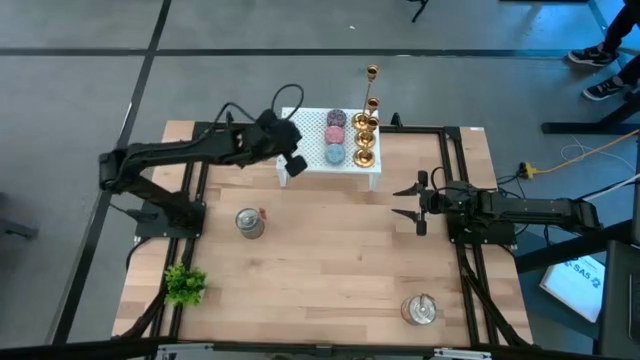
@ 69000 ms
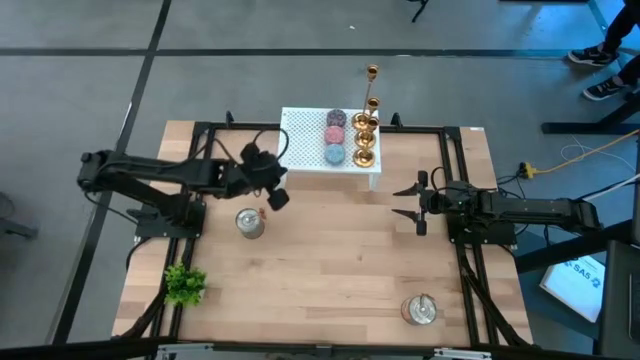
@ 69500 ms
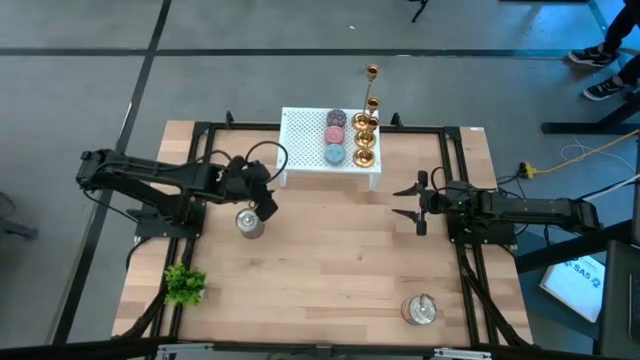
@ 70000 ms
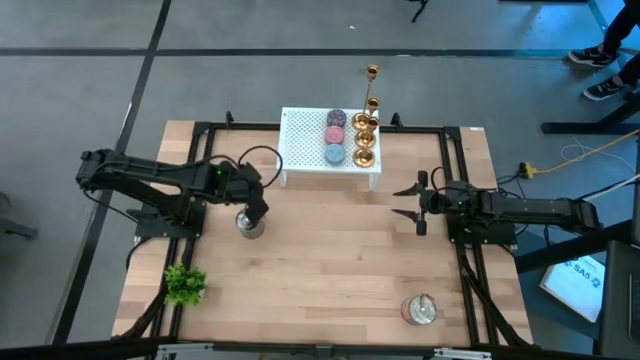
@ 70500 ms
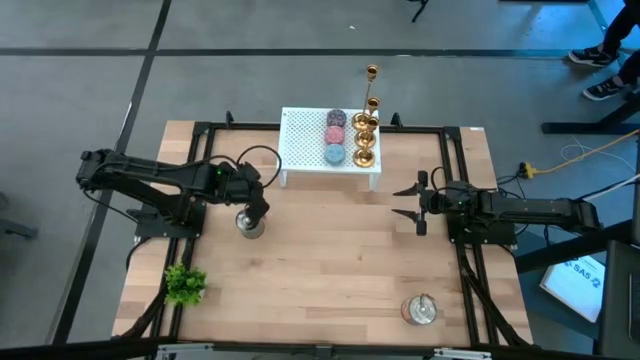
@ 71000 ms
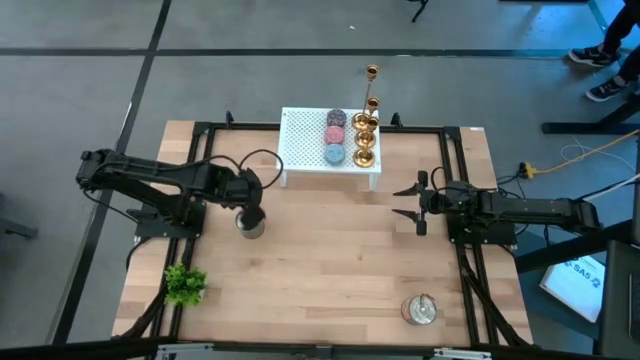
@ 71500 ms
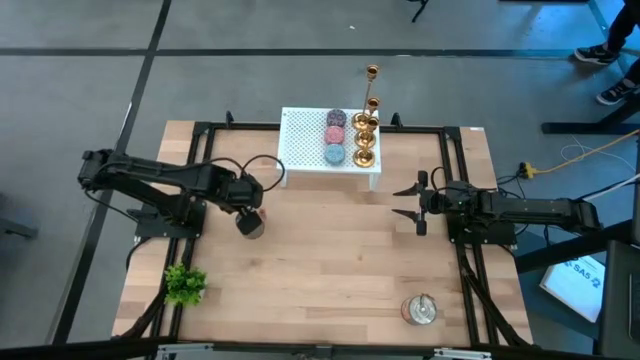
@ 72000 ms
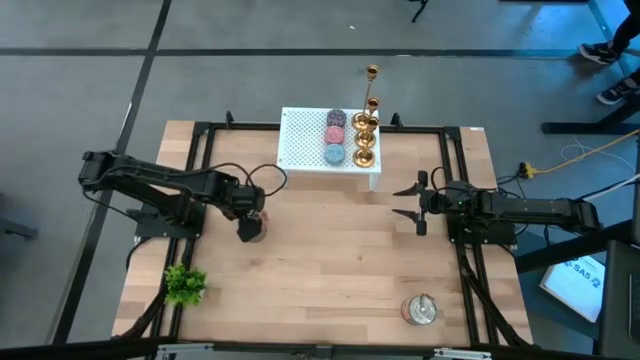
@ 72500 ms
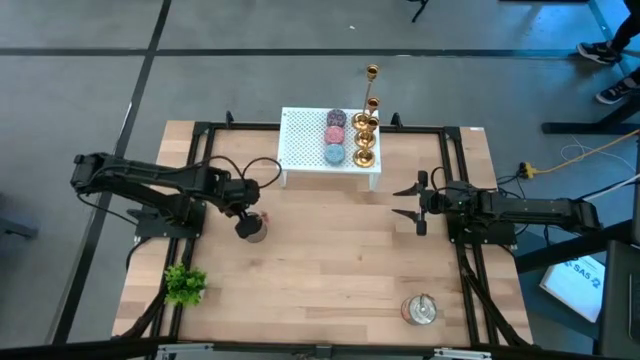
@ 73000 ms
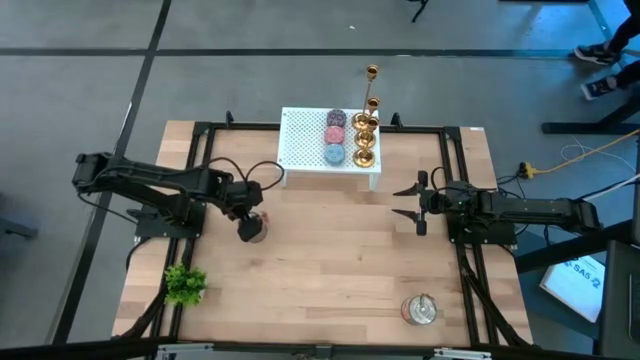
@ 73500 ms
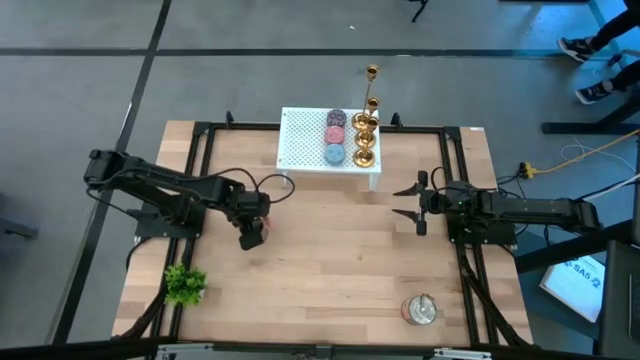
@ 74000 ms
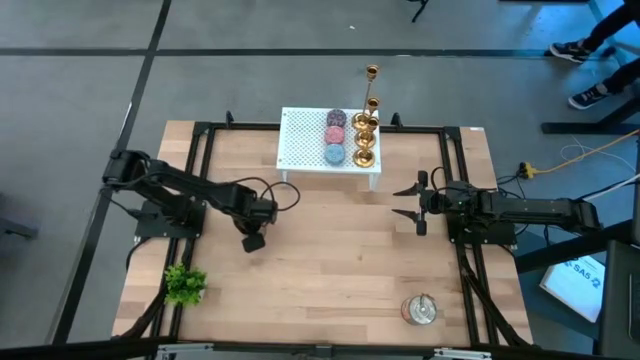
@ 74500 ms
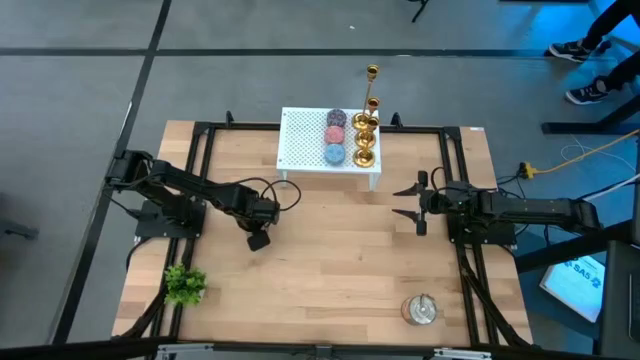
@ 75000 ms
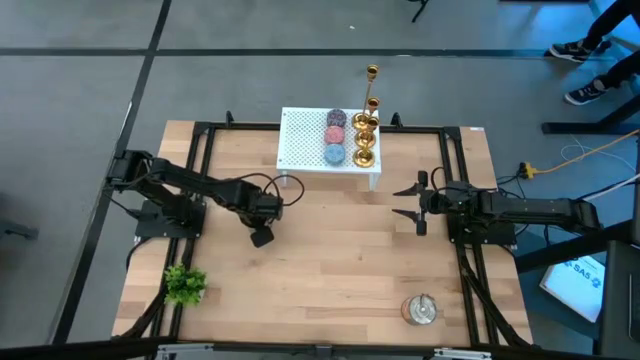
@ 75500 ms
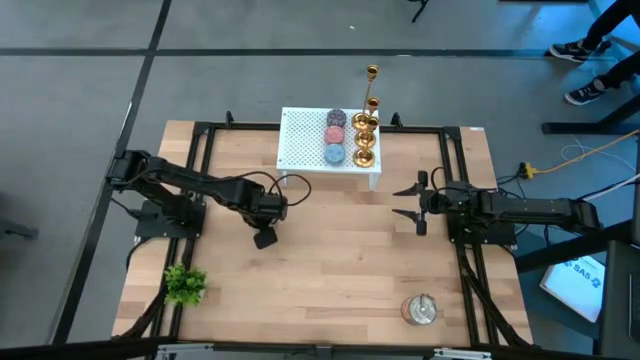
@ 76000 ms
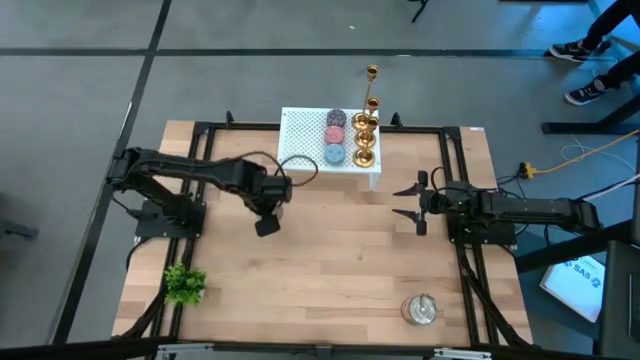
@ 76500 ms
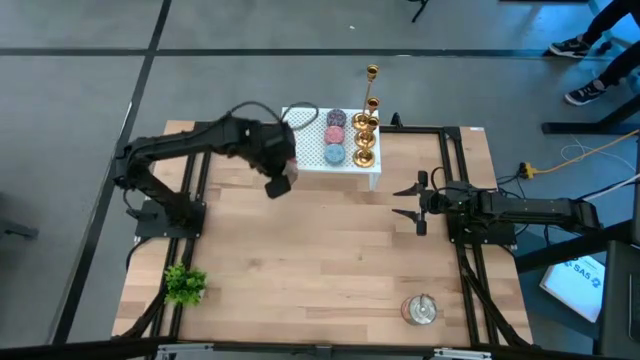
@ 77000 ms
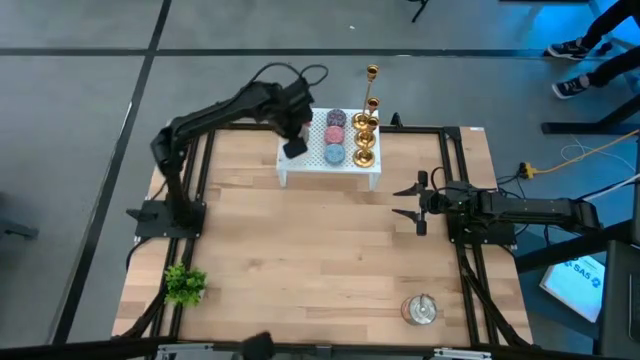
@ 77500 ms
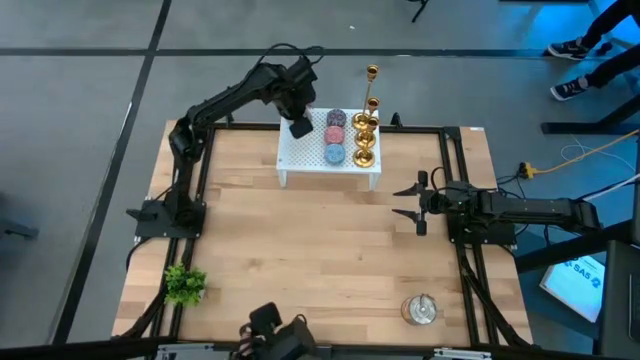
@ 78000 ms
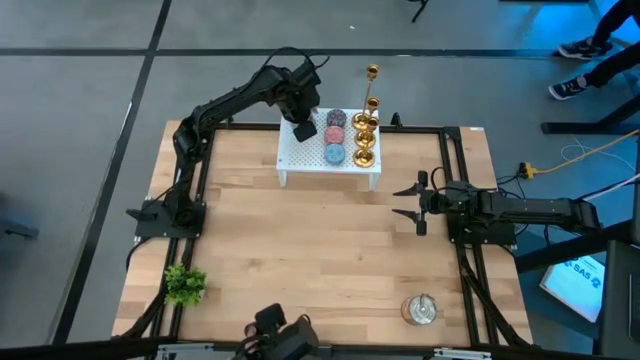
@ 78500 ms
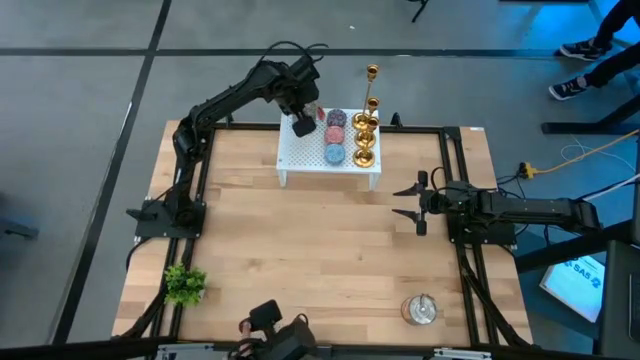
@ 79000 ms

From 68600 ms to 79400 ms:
Task: Pick & Place candle stick holders
Put the large brown scented candle can on the shelf

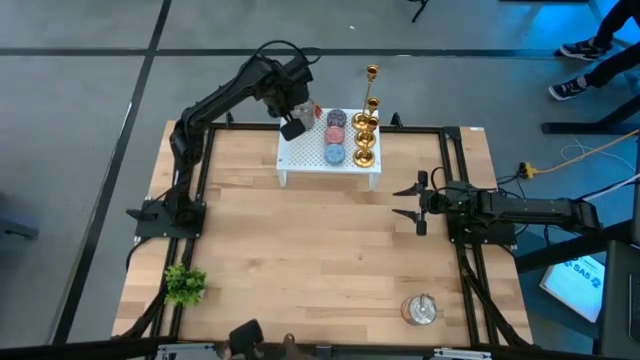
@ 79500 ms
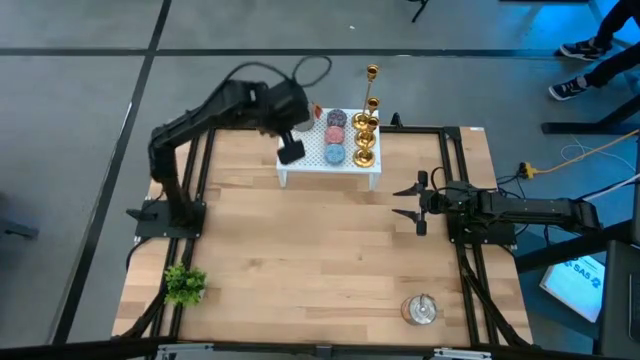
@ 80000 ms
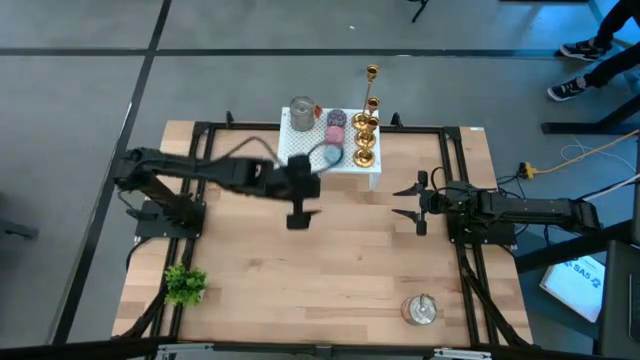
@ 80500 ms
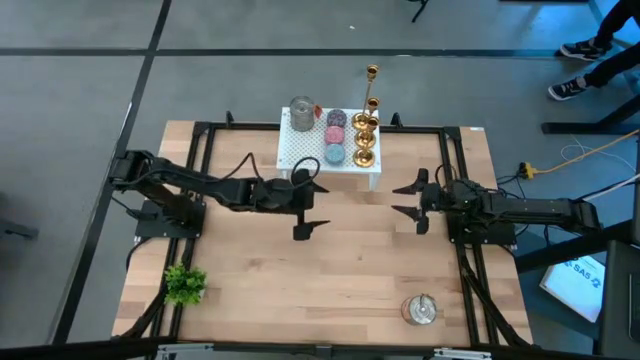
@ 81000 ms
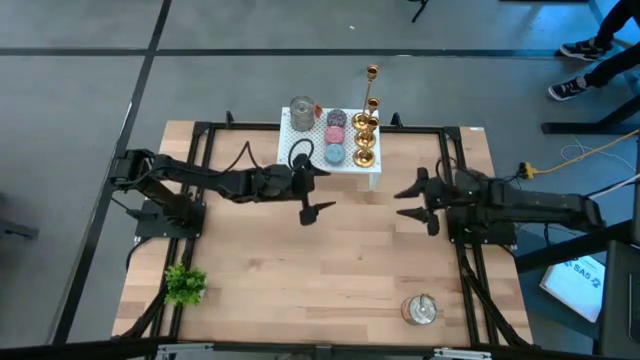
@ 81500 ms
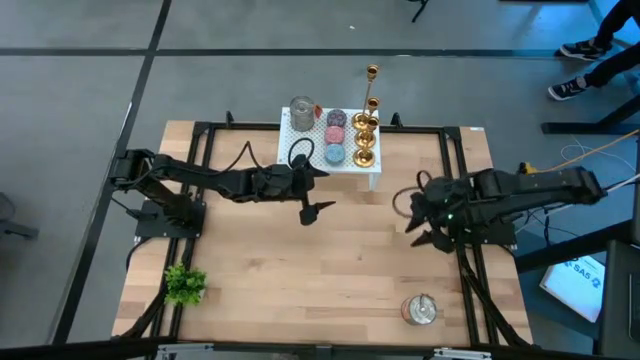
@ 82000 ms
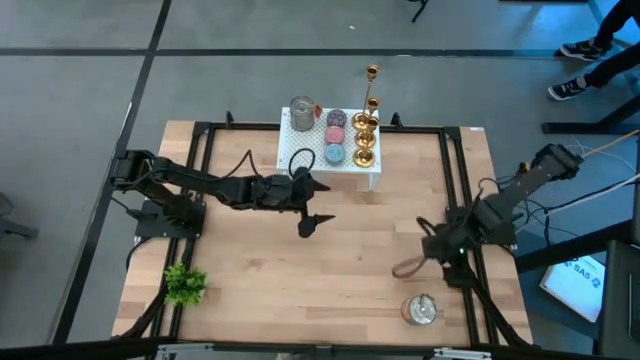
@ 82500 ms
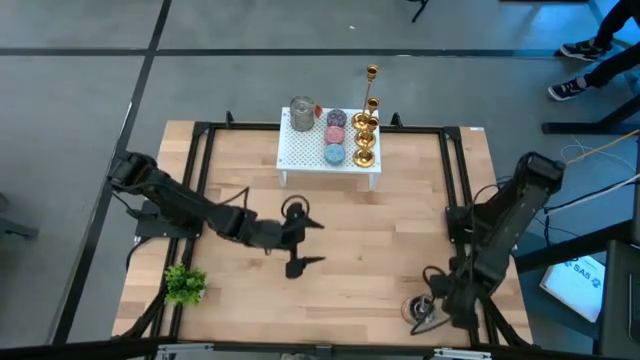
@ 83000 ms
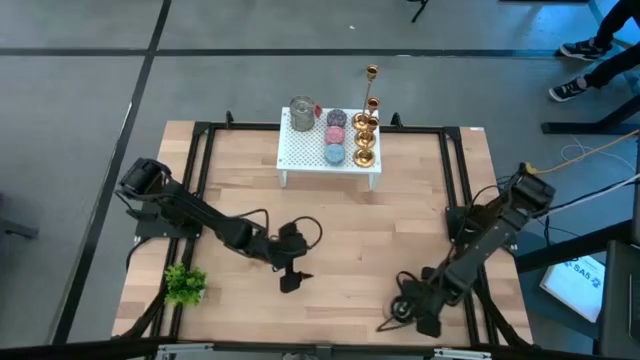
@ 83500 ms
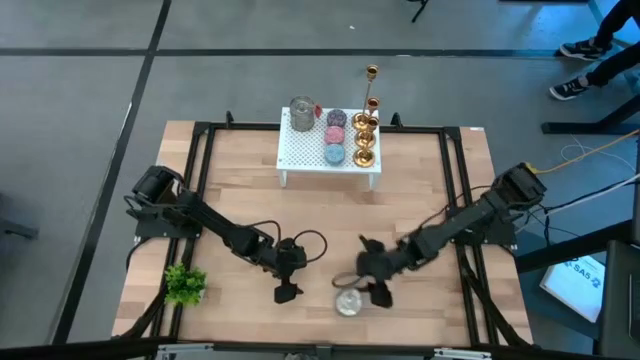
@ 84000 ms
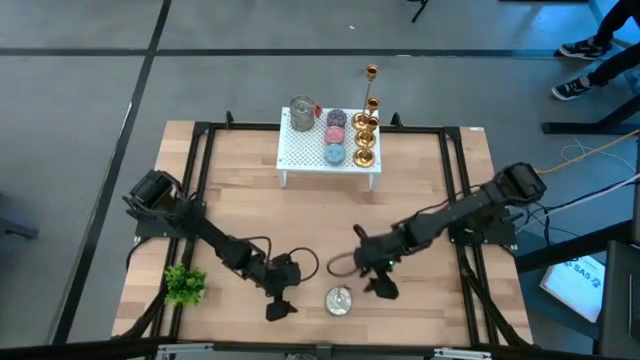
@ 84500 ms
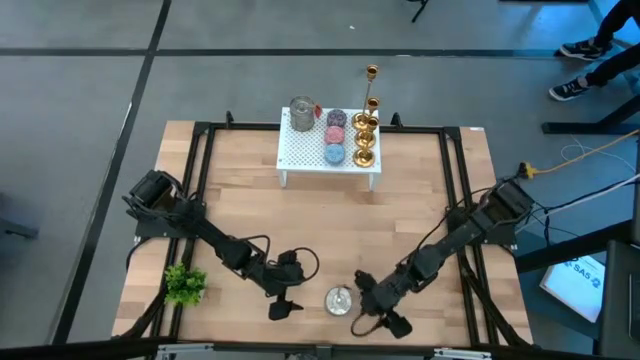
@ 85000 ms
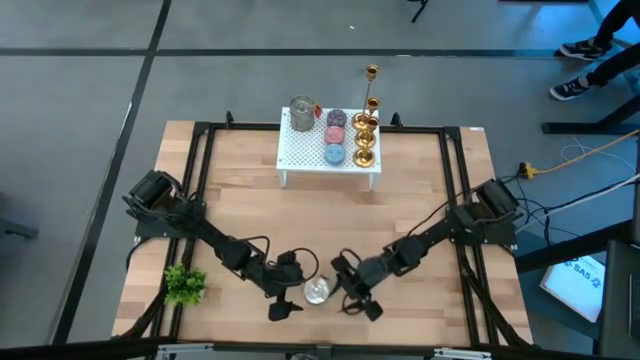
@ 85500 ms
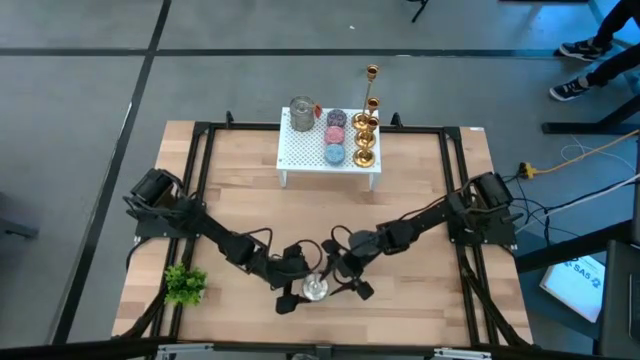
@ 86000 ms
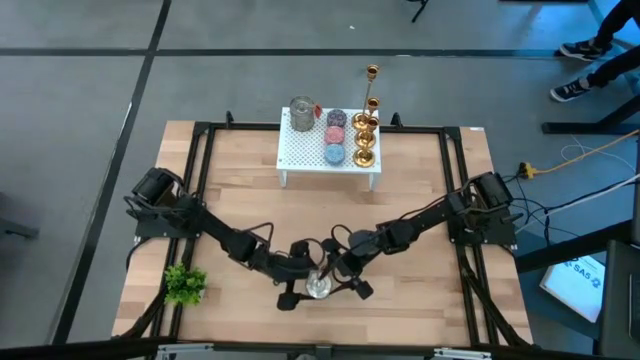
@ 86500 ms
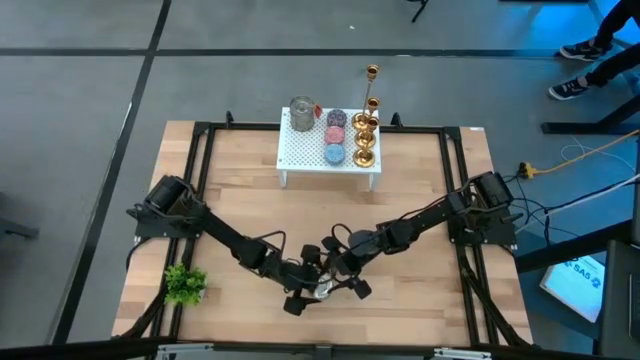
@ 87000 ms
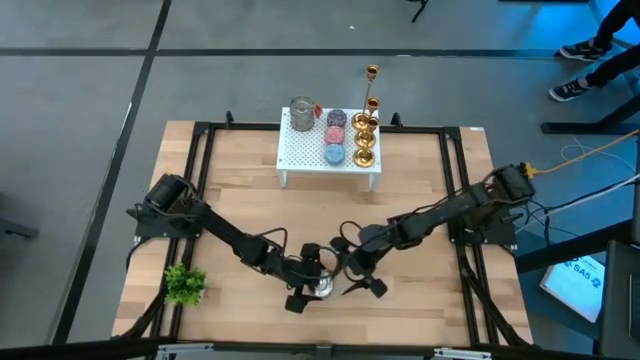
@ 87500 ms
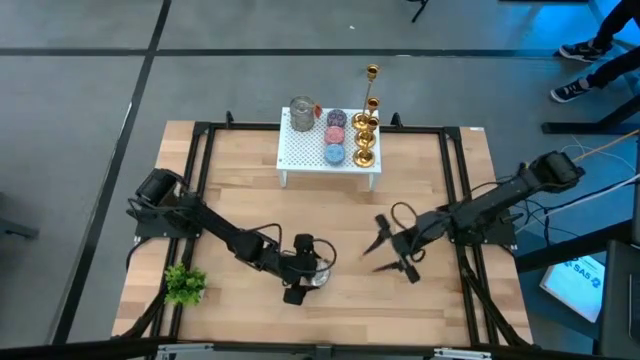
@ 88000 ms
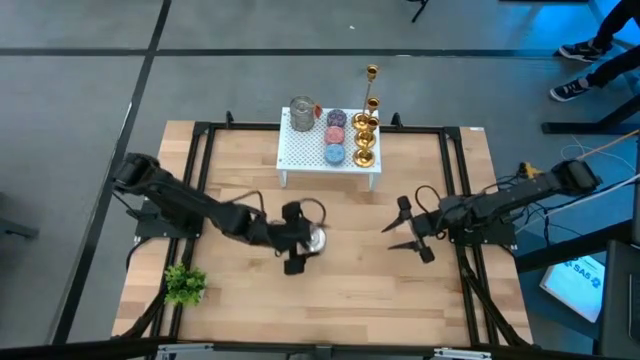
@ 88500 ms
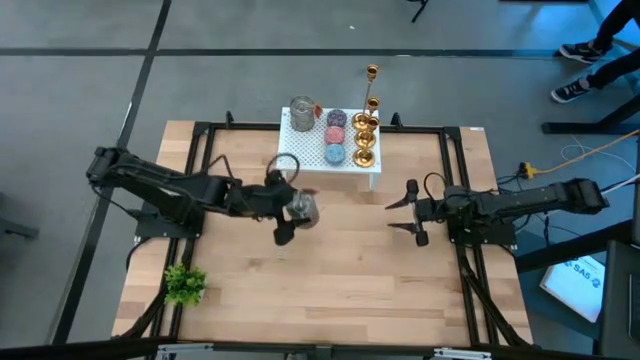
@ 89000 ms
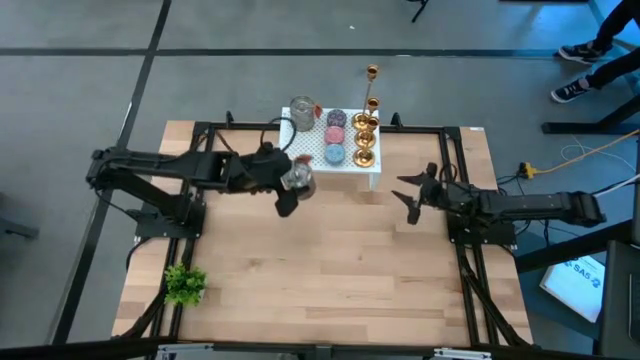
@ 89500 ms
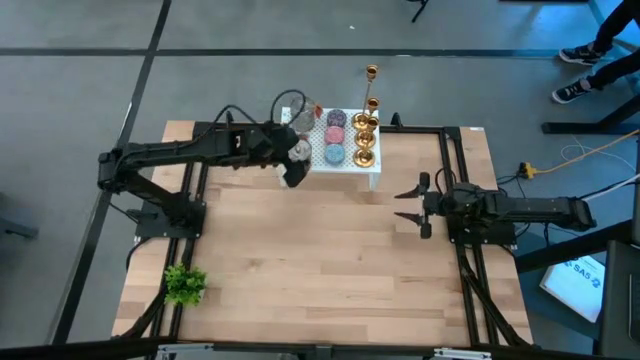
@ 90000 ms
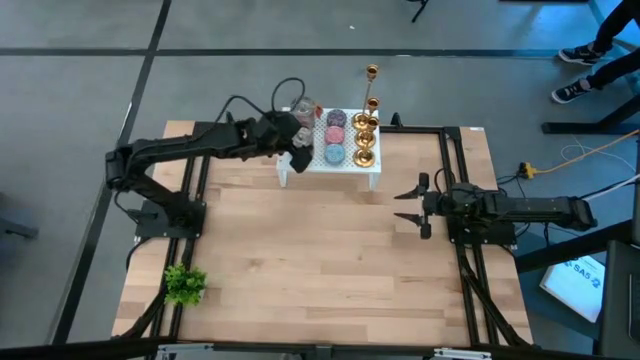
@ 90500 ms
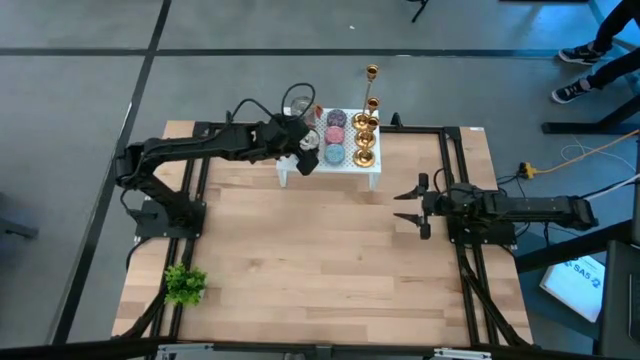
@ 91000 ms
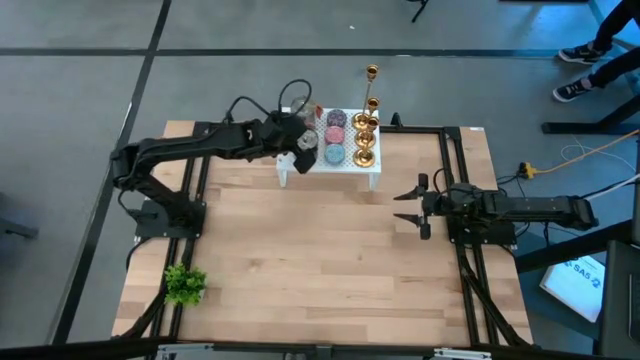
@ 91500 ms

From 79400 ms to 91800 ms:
Put the large yellow scented candle can on the shelf
